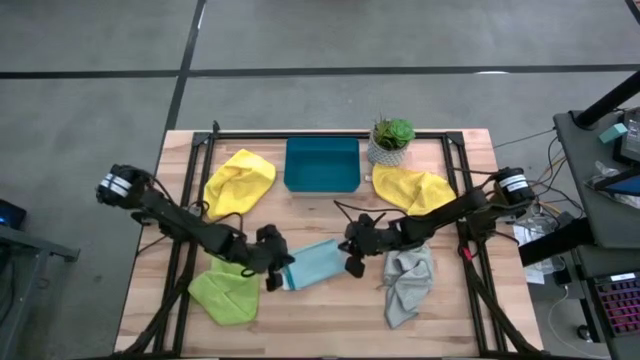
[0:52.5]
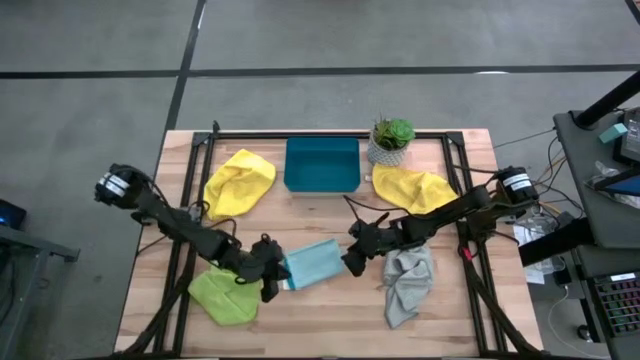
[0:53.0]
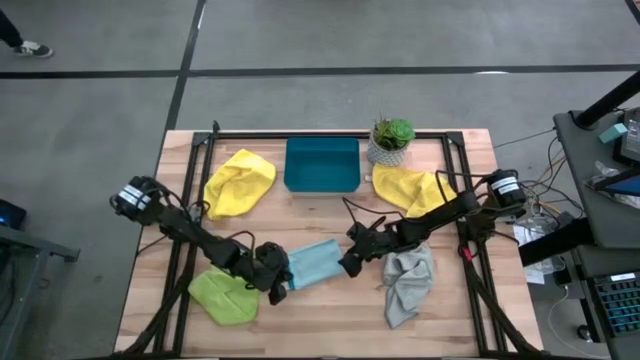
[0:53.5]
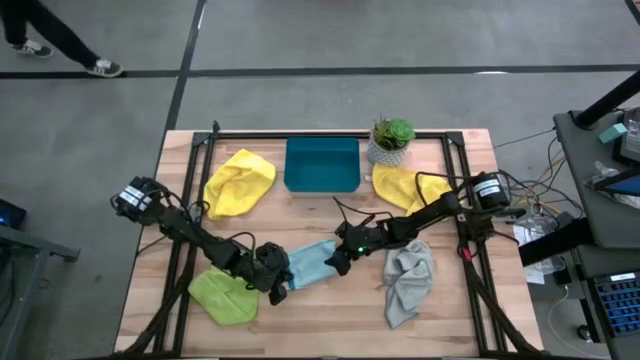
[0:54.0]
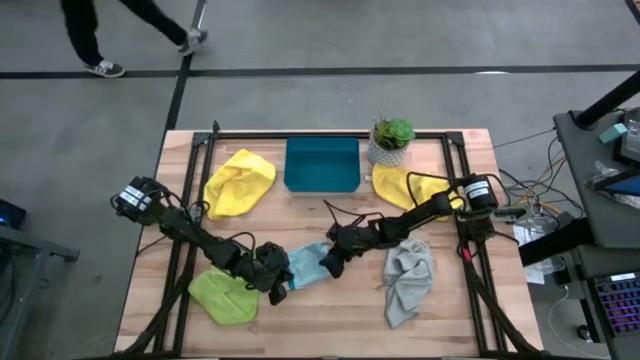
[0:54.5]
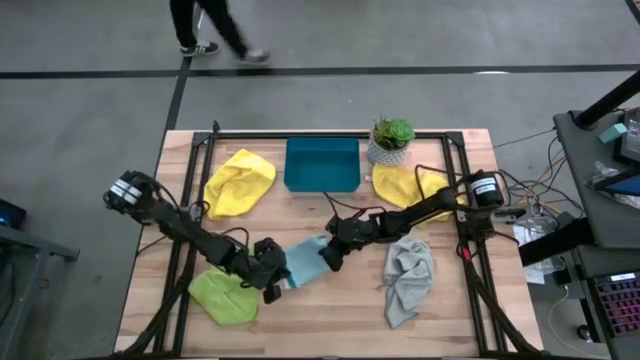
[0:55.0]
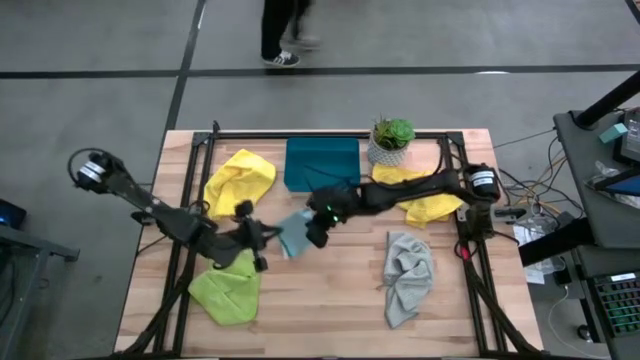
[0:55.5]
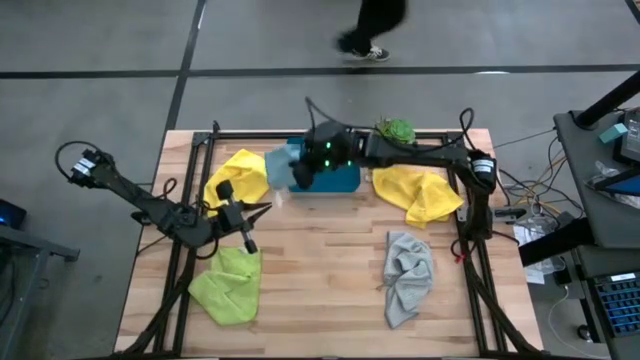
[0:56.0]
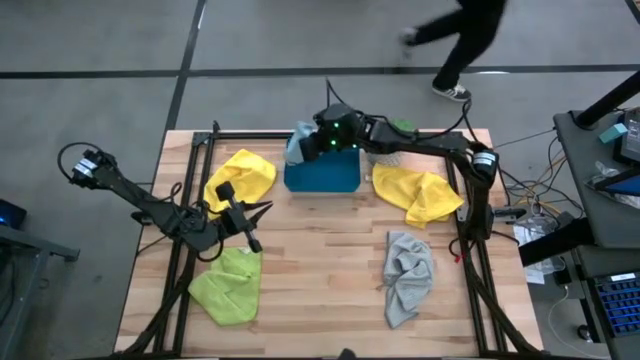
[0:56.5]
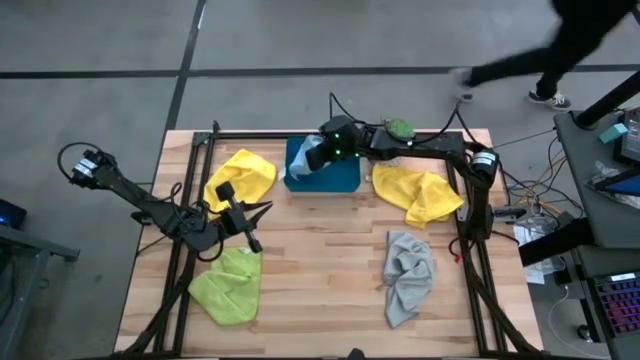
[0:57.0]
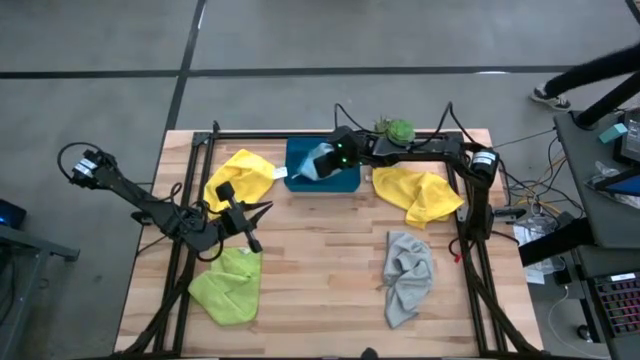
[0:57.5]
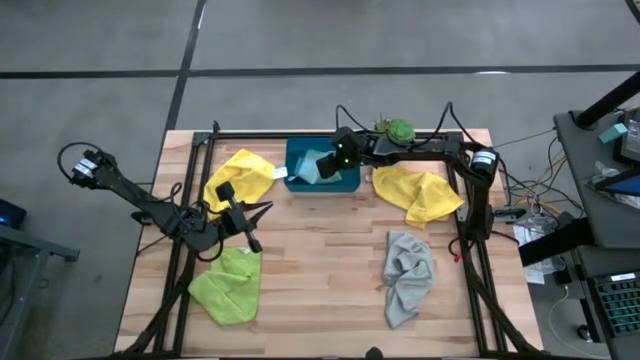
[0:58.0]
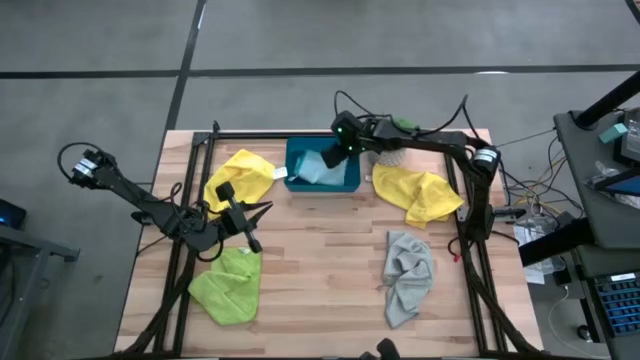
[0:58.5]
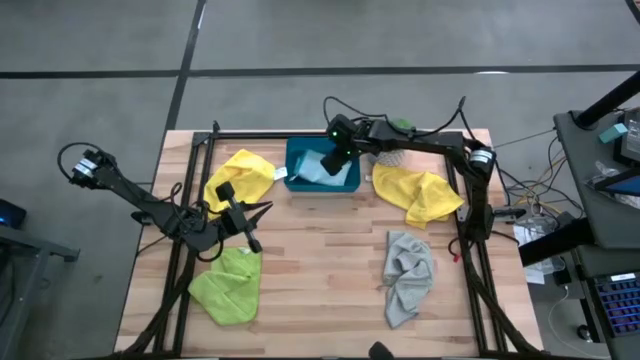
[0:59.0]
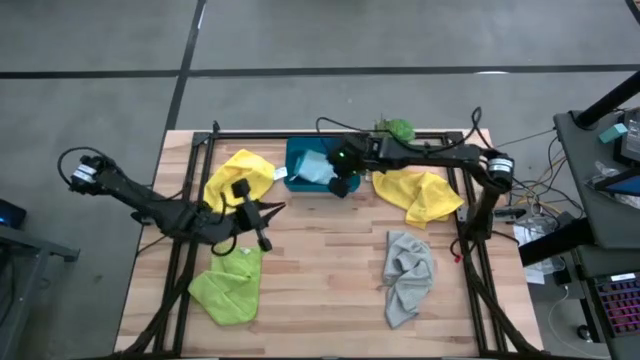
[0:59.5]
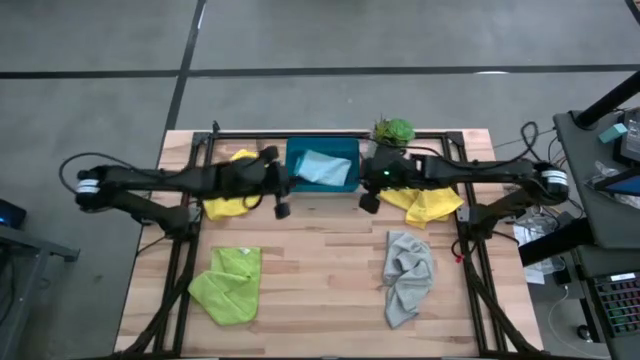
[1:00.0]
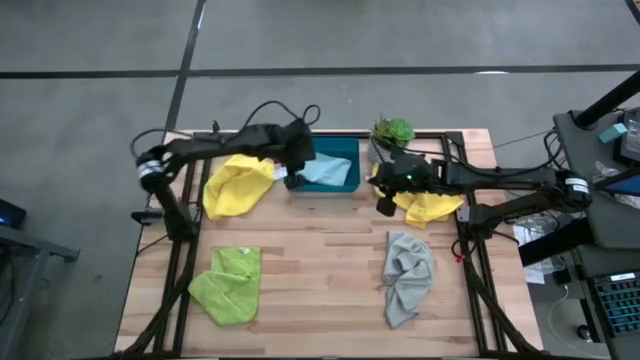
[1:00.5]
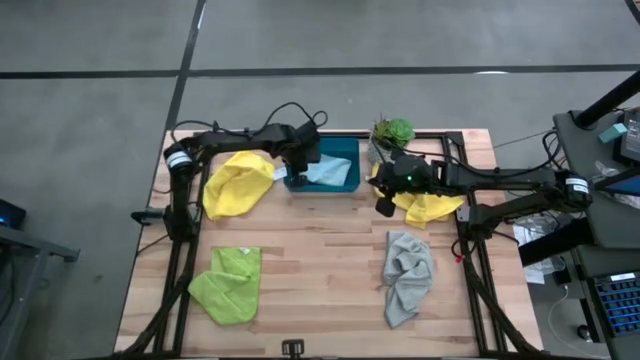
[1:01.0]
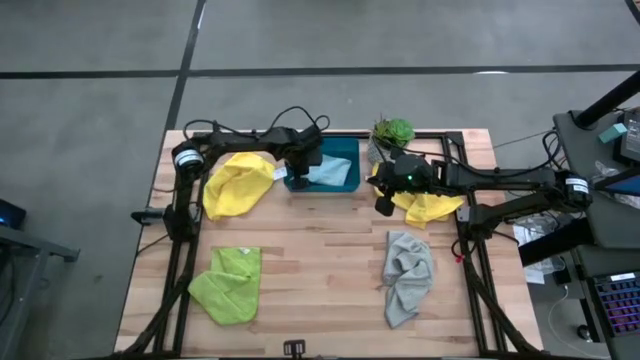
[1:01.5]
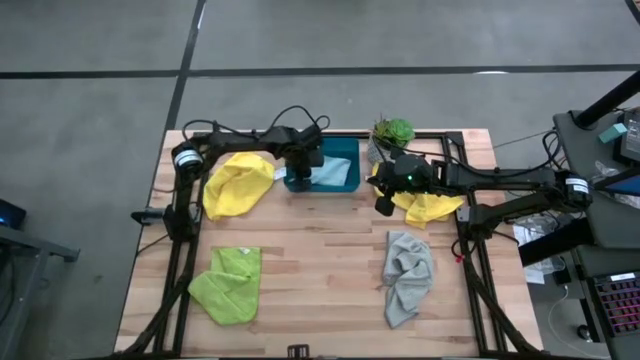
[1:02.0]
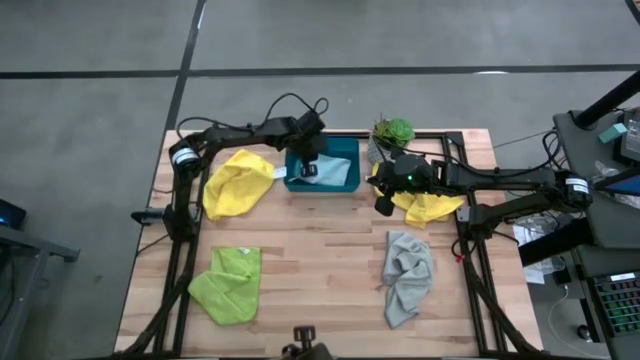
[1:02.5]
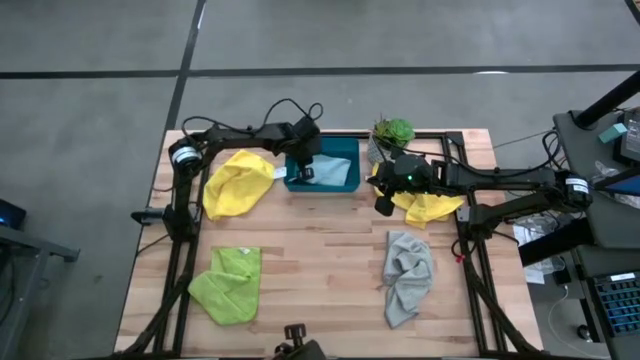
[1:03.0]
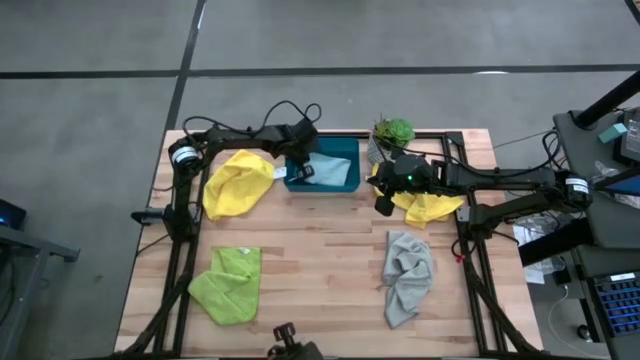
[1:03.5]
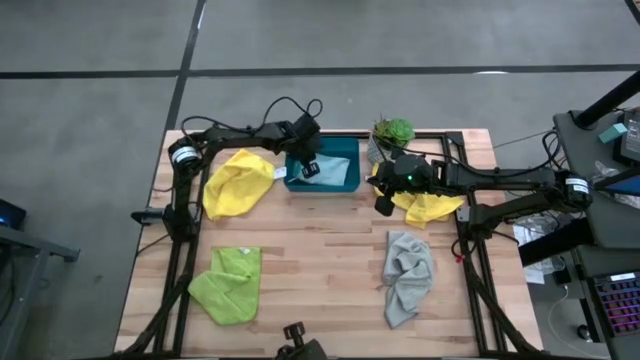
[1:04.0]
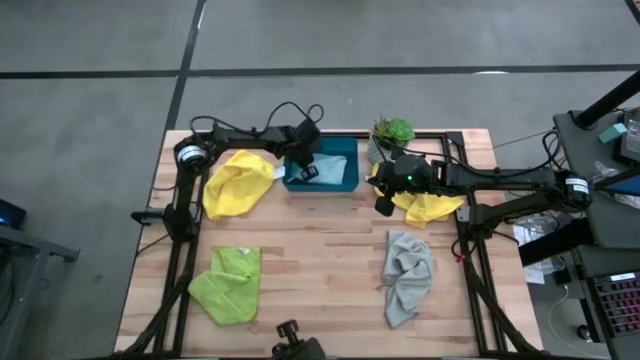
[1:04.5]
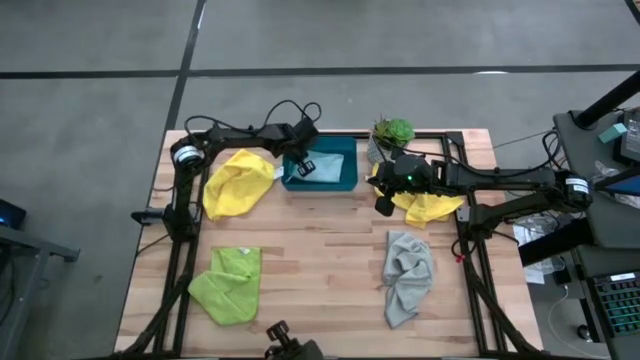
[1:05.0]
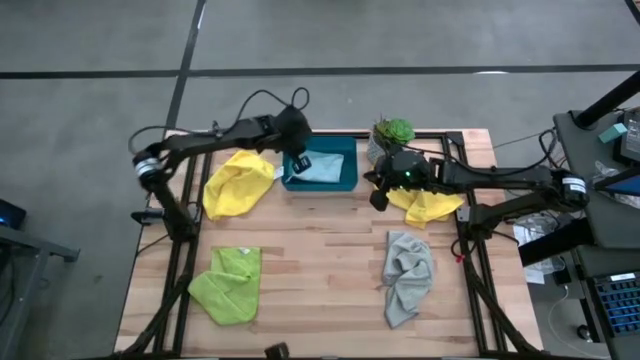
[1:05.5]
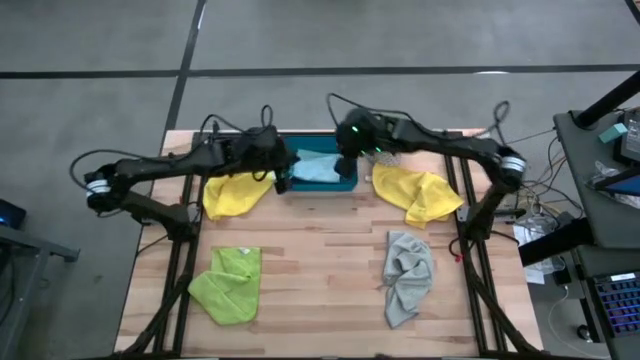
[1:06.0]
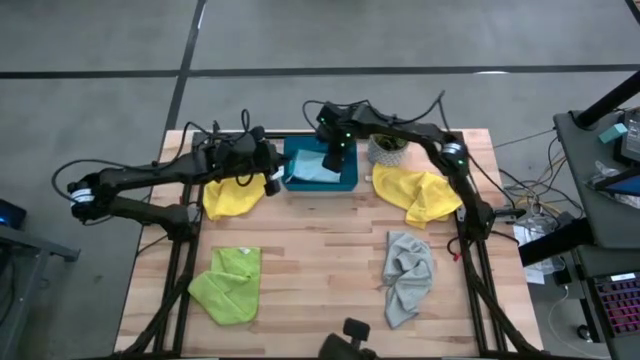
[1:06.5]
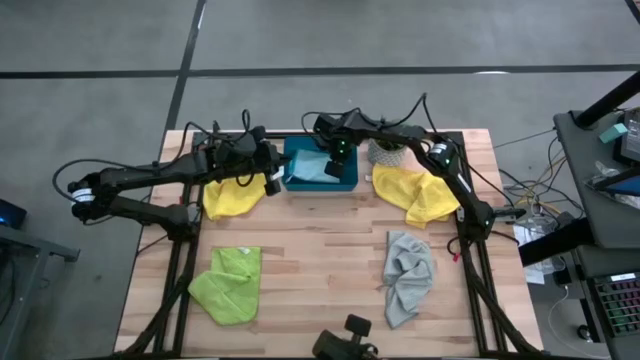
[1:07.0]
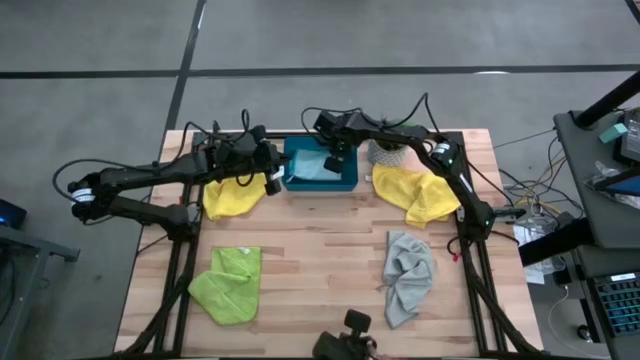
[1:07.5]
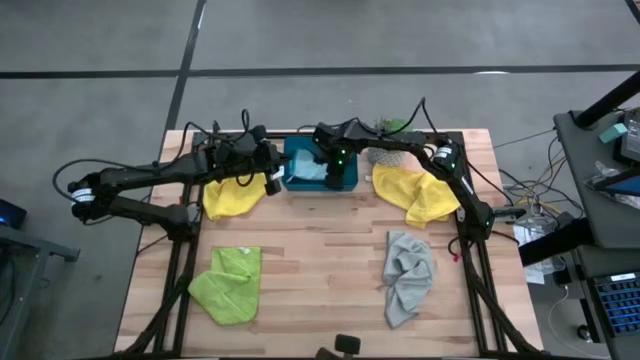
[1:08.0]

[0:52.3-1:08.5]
Task: Fold microfiber towels
Put the folded blue microfiber cloth into the blue bin

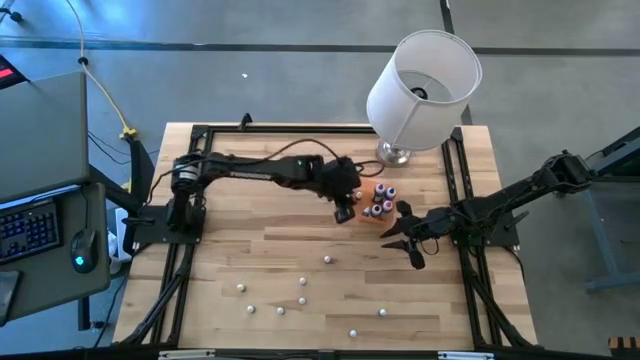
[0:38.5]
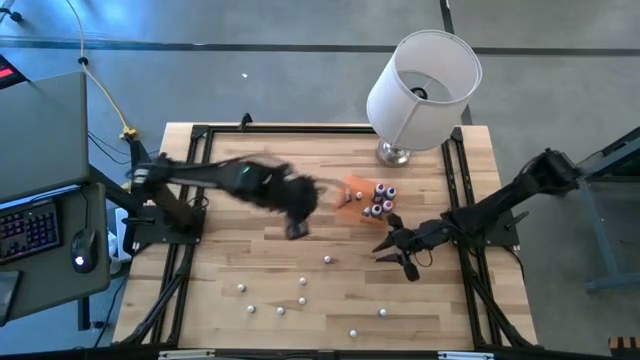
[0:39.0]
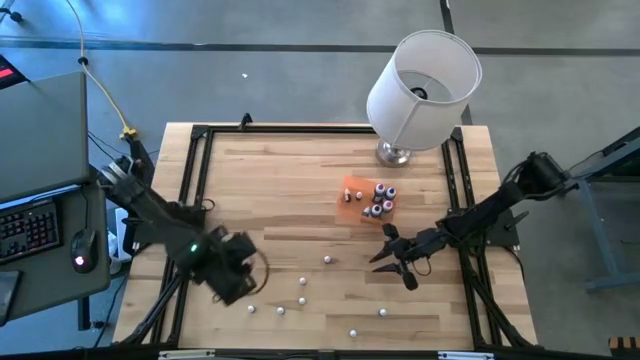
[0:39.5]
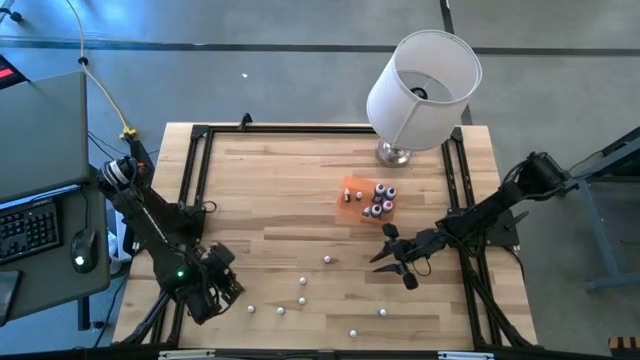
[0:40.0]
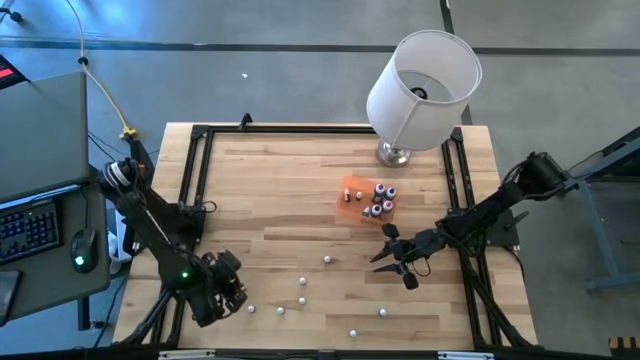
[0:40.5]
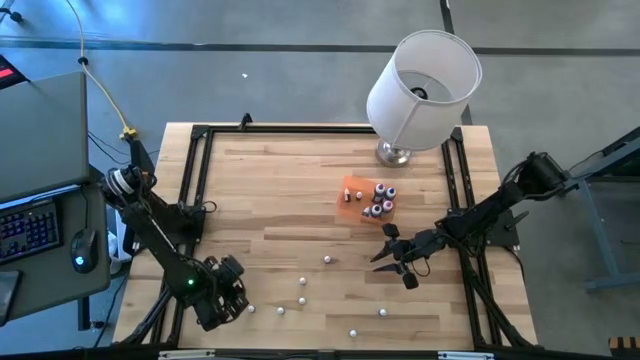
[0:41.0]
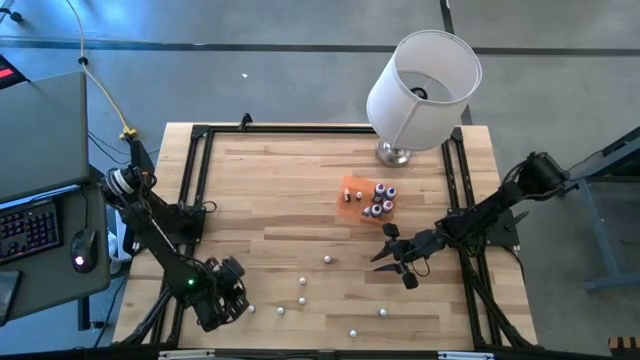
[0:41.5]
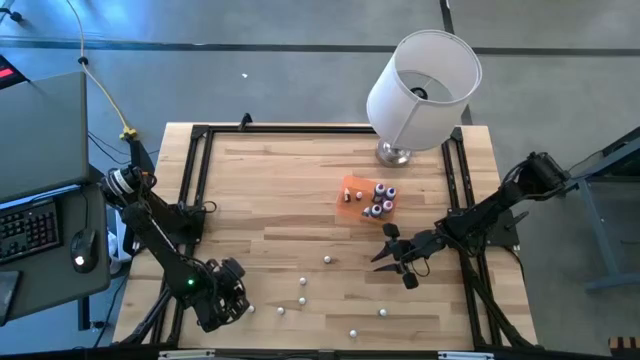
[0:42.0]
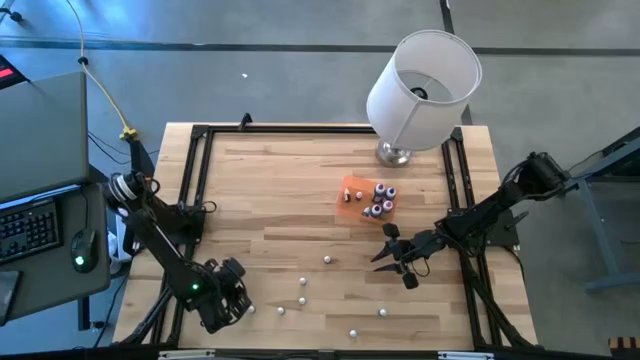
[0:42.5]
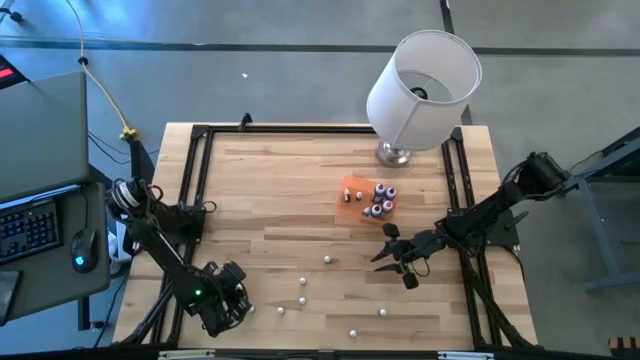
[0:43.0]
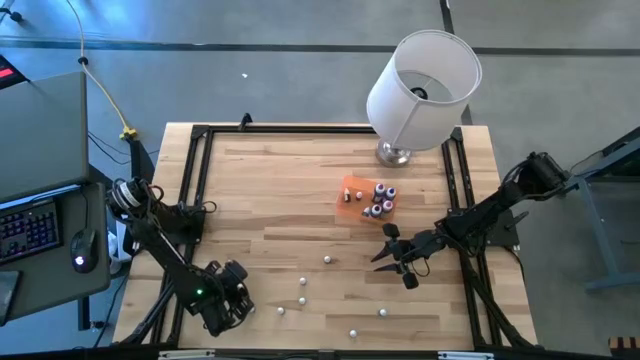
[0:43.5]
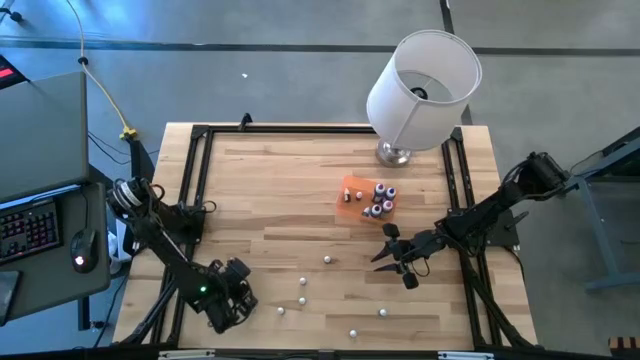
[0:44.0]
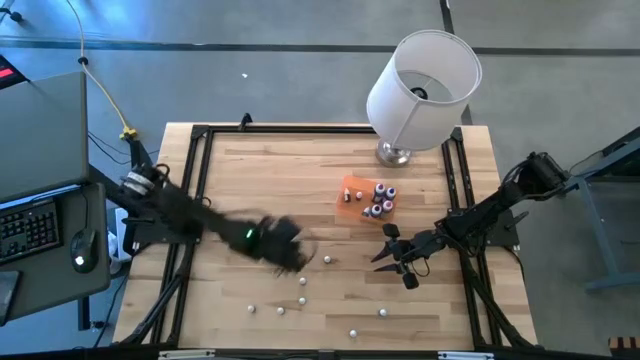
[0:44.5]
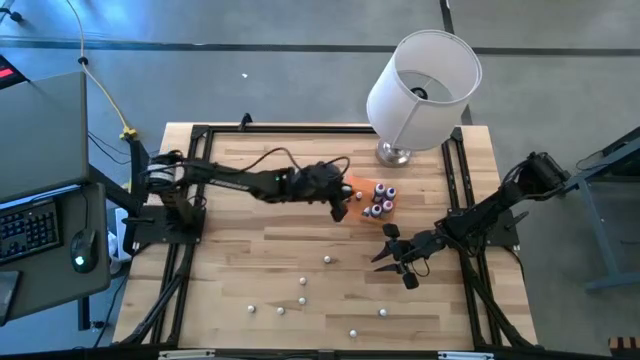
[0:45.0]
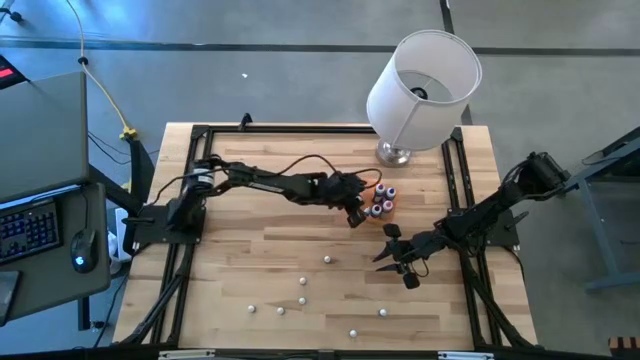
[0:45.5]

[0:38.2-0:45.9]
Task: Pick & Place food coloring
Put the top left small green food coloring bottle into the orange container
